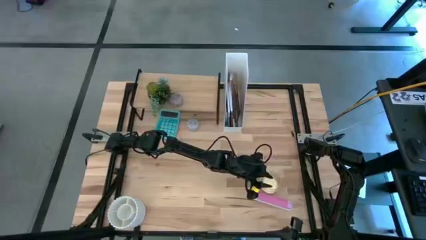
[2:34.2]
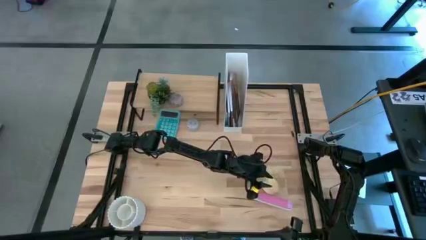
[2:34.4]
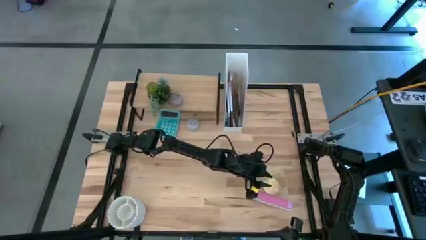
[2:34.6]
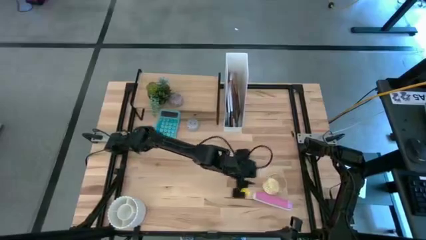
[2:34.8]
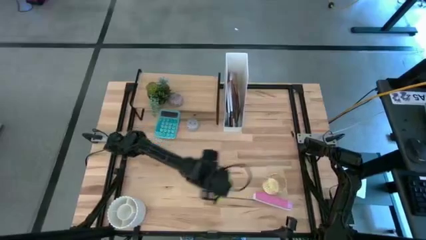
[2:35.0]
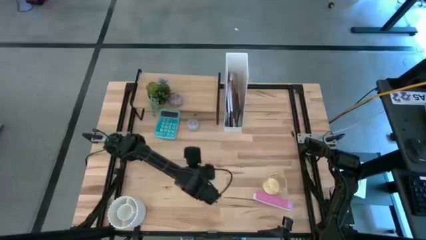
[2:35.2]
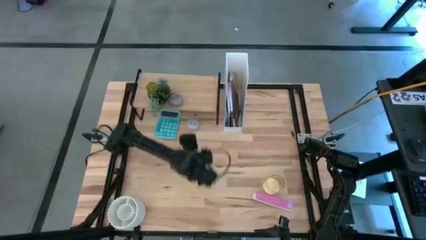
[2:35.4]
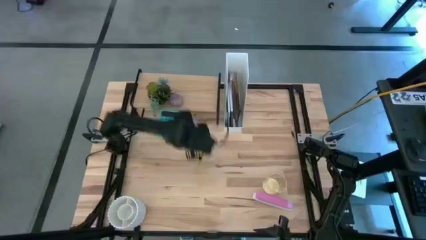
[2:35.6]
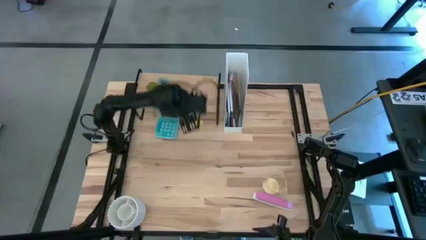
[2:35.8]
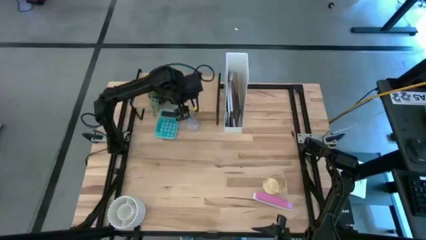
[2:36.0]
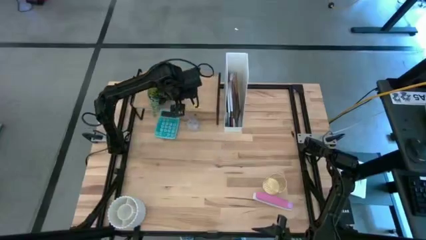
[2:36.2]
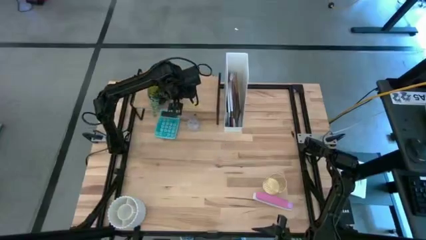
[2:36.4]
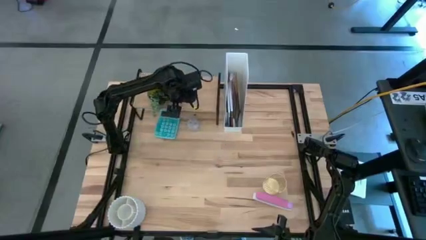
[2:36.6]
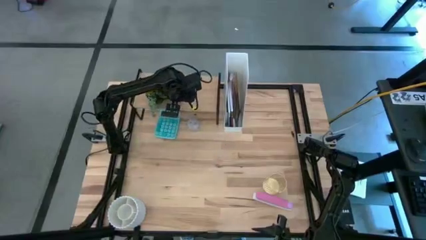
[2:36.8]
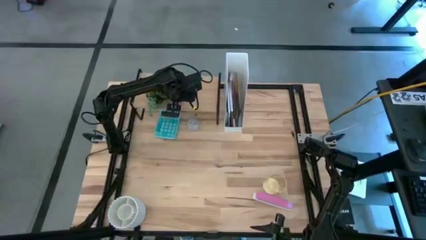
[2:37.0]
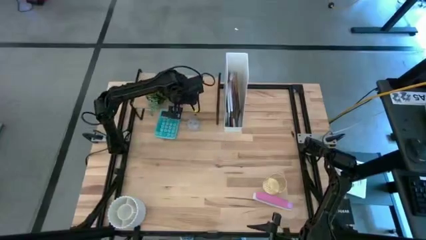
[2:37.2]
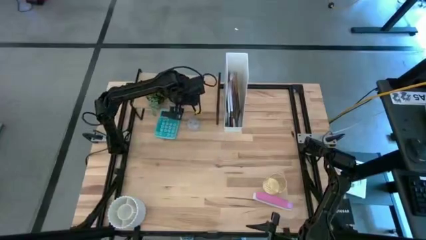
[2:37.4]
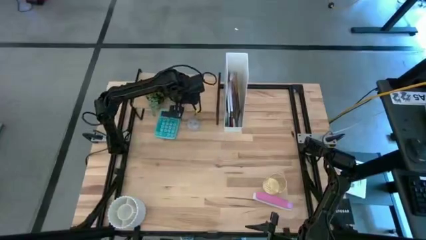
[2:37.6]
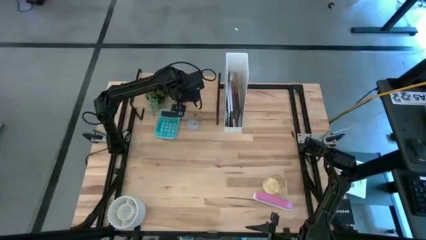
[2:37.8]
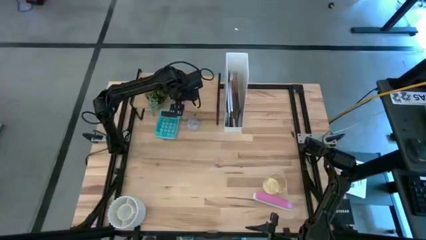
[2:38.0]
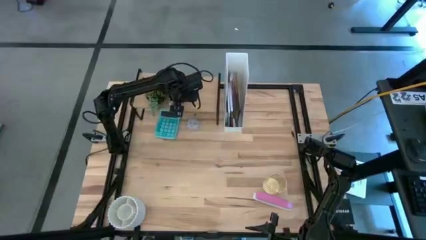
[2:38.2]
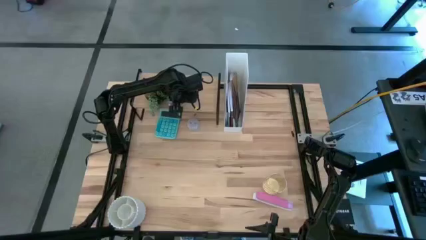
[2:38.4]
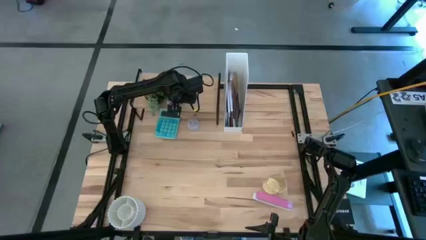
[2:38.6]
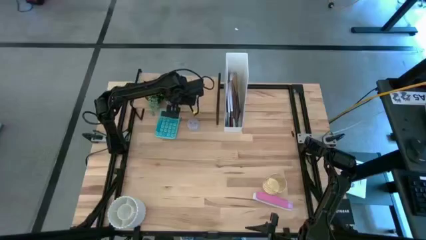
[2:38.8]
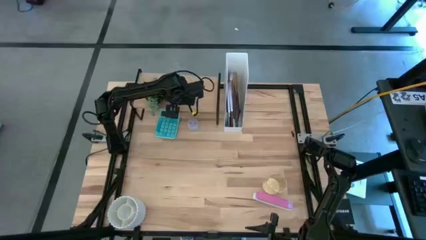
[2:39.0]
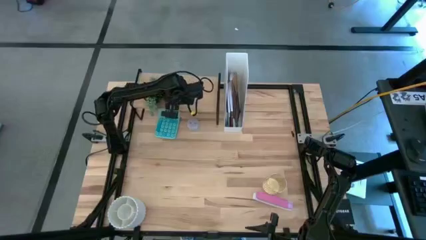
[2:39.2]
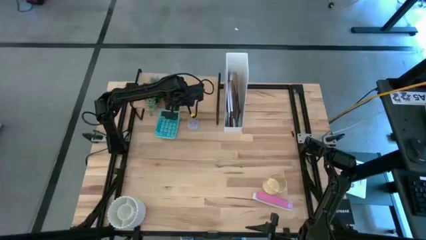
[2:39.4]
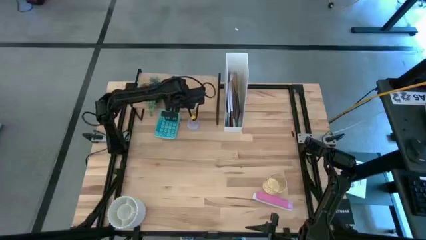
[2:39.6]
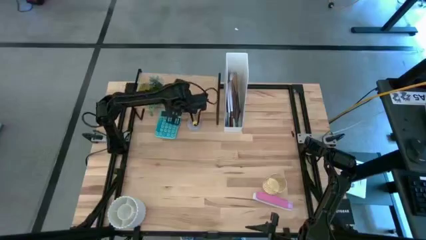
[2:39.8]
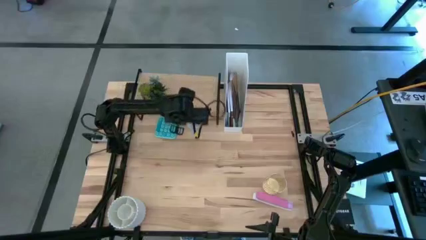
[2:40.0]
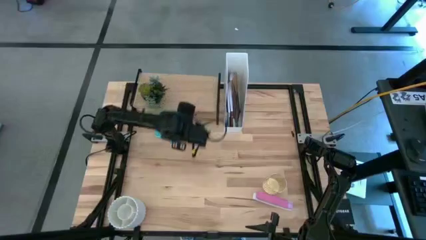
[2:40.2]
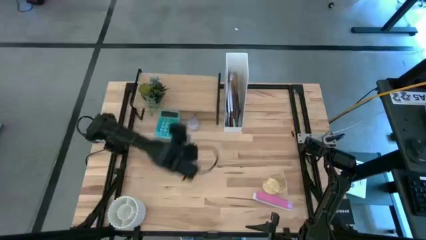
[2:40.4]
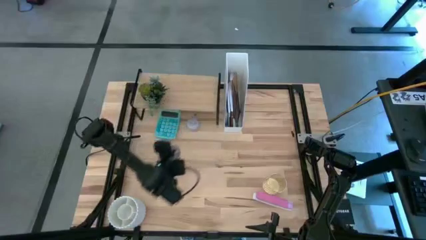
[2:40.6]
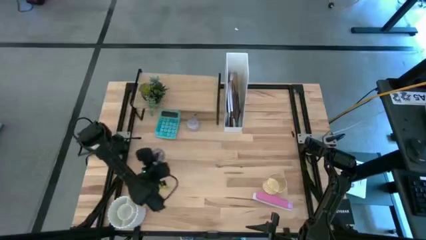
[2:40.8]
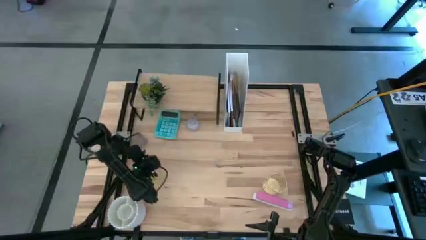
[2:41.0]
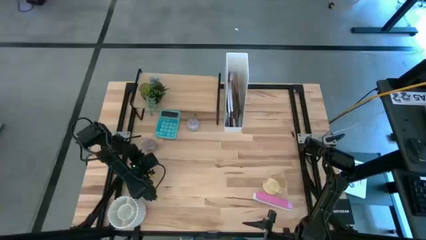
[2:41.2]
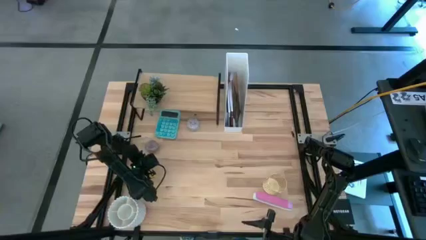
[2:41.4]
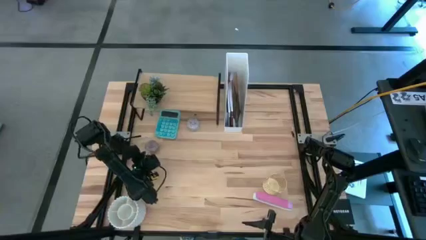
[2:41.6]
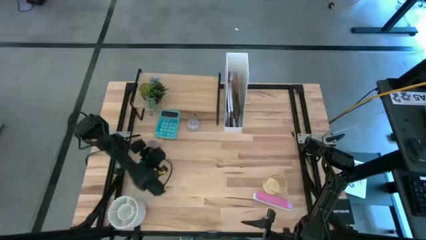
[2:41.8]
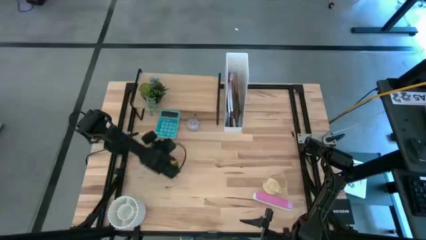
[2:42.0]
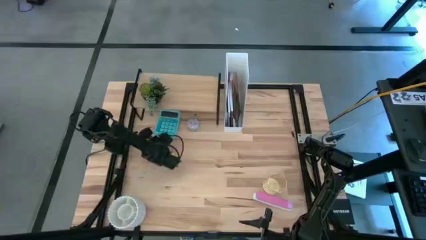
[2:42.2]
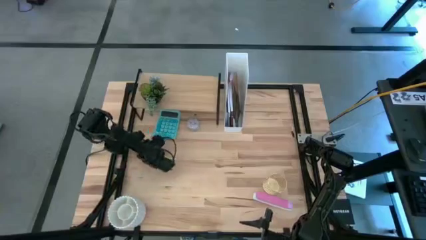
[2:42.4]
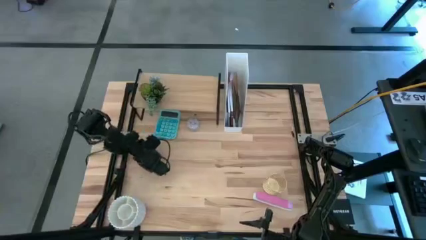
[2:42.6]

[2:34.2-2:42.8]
Task: Stock shelves
Remove the red scented candle from the shelf

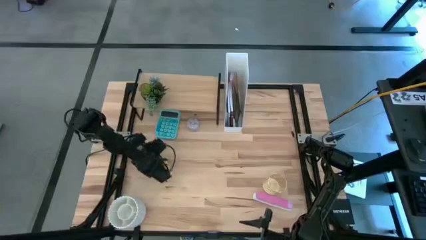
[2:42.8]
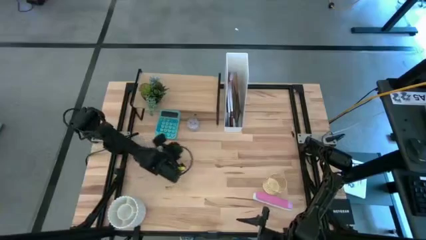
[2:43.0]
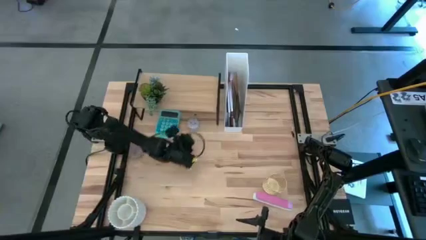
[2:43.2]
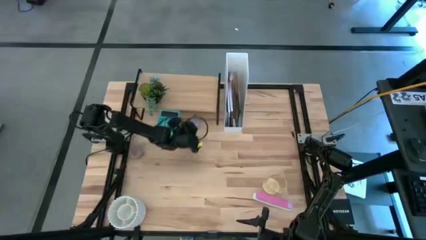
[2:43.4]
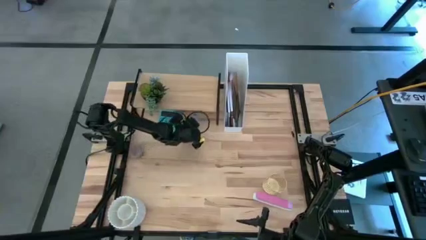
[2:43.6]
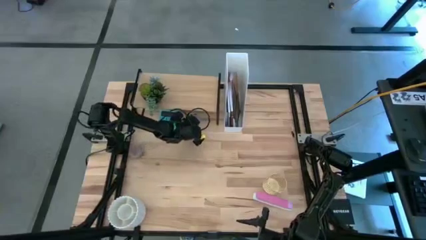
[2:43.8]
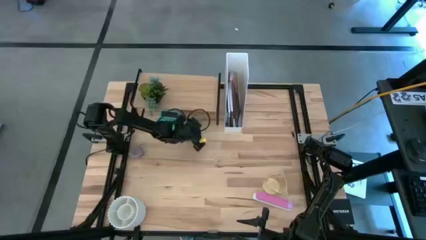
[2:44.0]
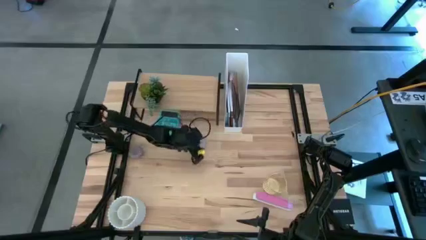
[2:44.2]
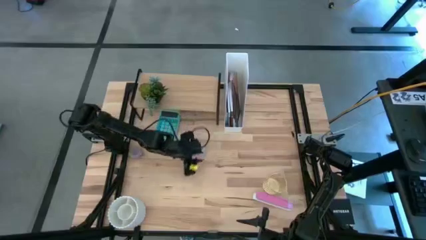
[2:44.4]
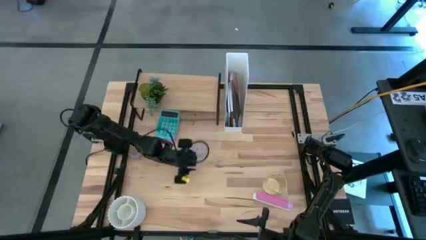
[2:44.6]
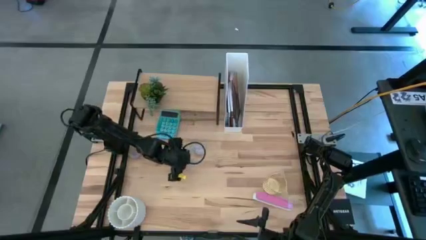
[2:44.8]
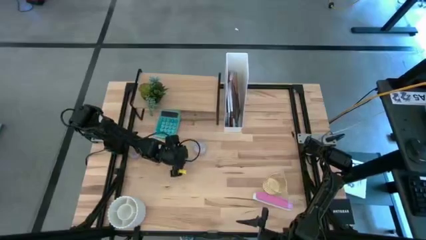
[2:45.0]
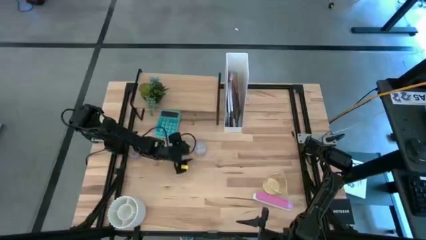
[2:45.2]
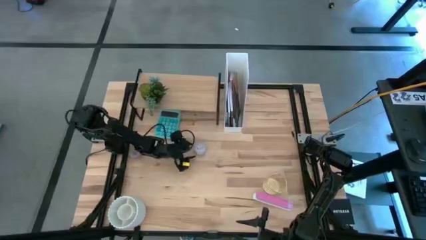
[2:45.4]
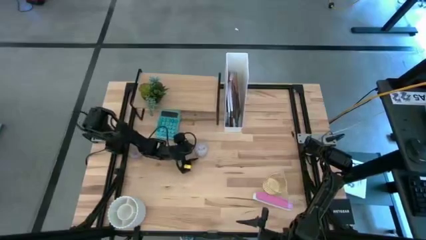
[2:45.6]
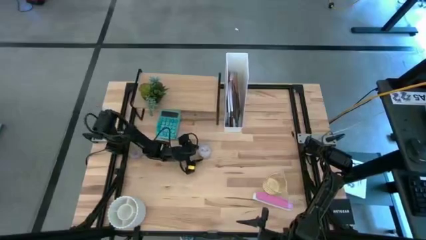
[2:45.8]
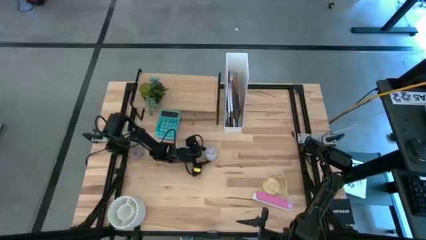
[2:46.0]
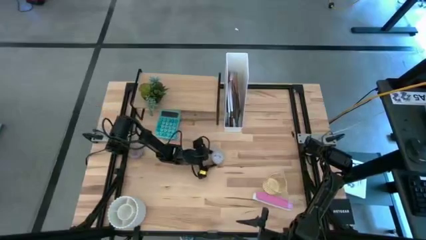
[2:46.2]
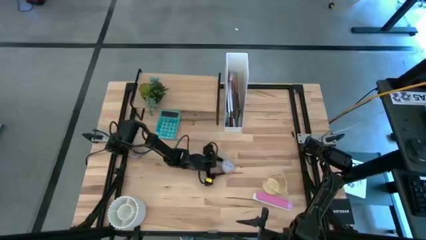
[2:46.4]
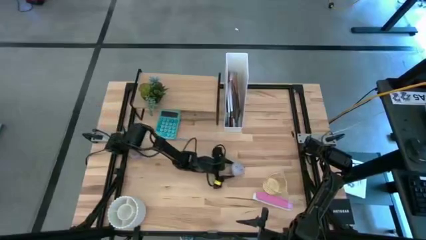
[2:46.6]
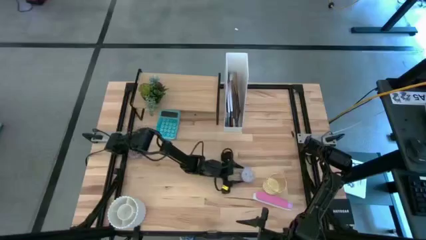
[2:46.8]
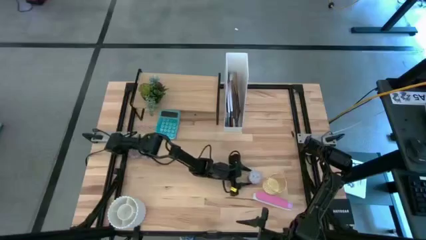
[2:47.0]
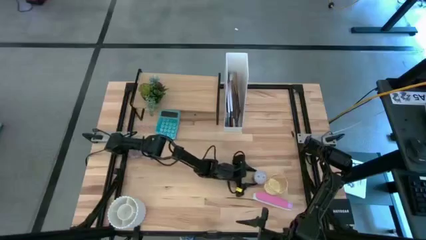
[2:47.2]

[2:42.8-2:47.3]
Remove the white scented candle from under the shelf

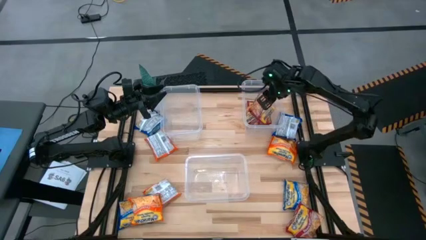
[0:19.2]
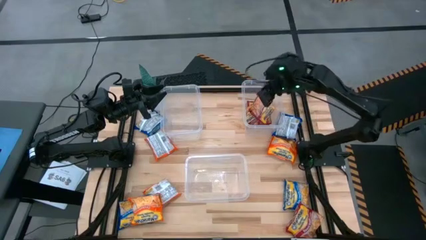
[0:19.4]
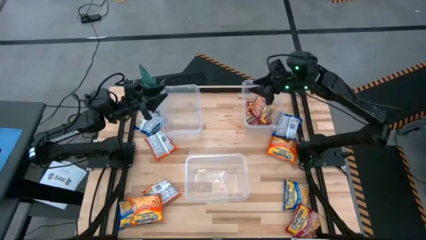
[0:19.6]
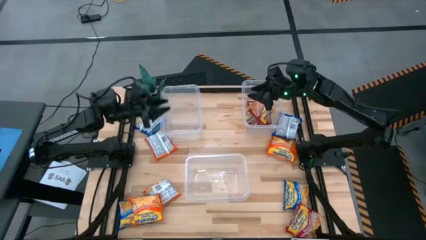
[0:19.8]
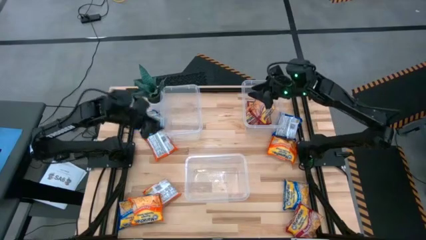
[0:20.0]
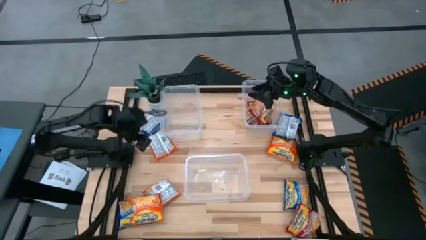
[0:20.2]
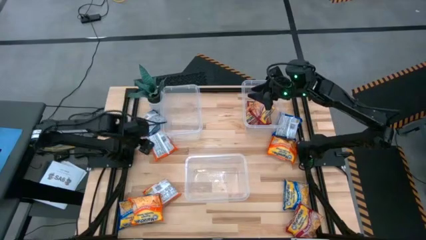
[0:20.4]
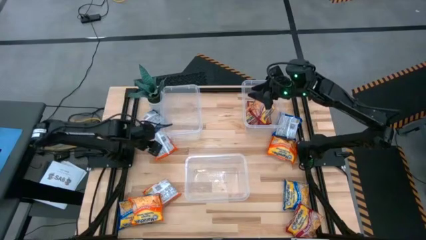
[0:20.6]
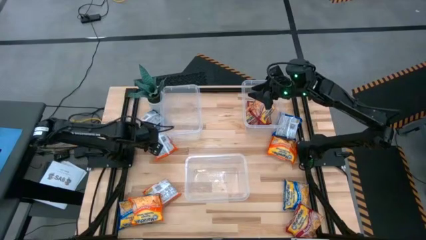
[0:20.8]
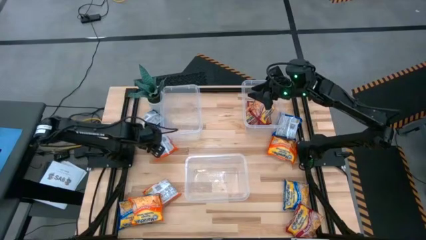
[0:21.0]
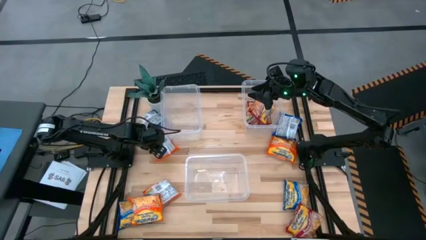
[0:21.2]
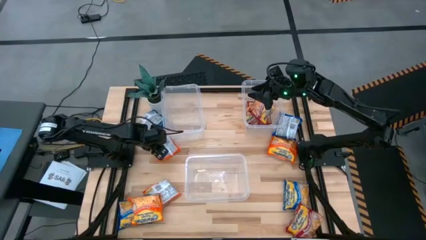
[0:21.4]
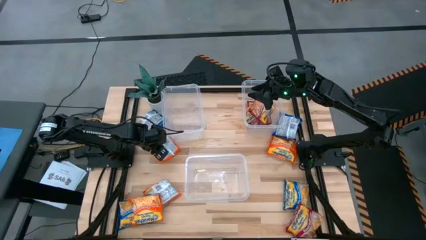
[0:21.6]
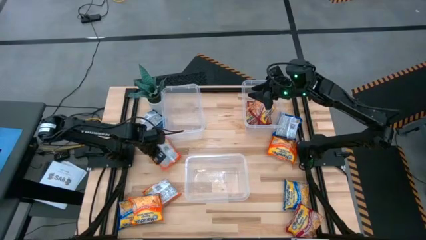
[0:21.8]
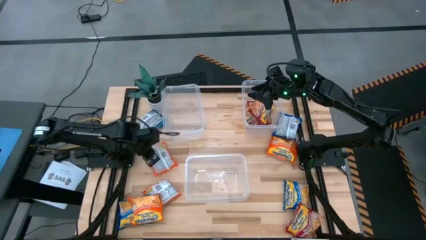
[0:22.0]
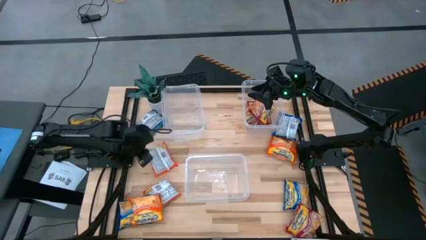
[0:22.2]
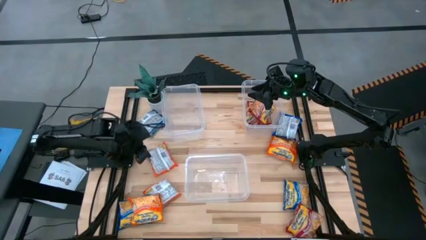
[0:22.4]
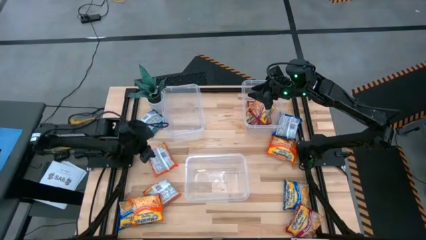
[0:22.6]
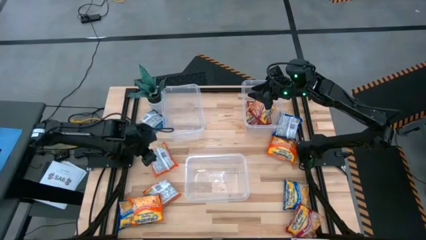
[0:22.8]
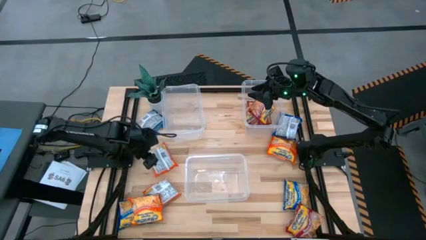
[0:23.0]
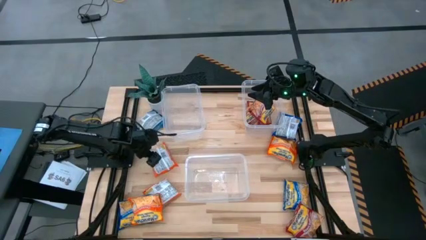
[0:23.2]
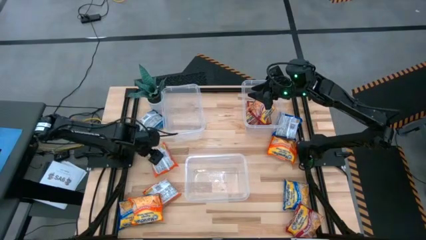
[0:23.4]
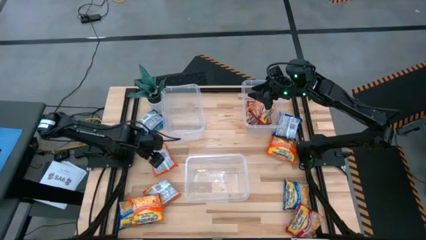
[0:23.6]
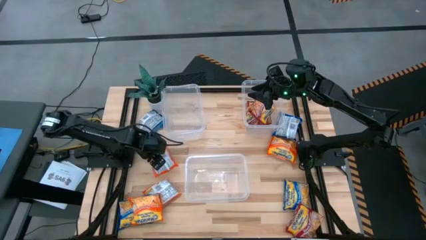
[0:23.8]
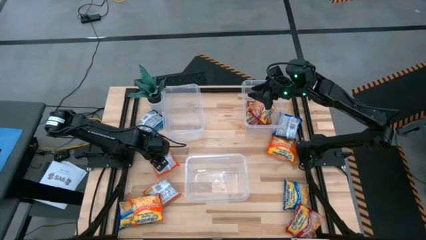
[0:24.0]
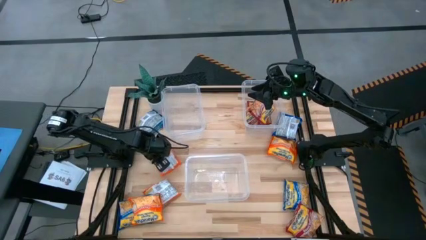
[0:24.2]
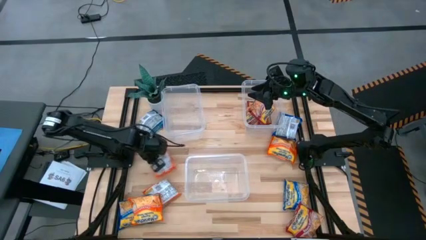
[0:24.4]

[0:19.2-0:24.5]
Task: Sort Maruchan noodles
Put the middle left orange bag into the top left transparent bin
